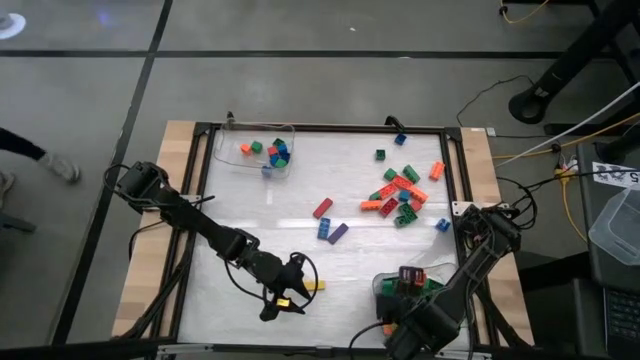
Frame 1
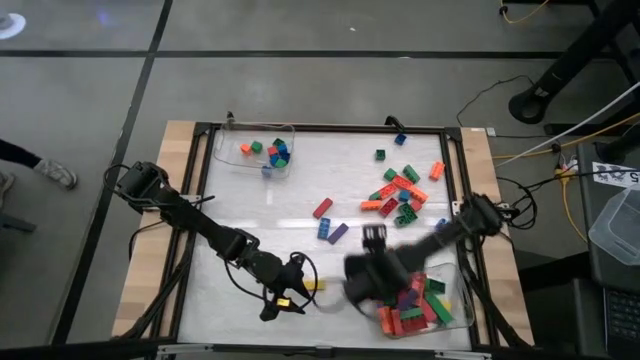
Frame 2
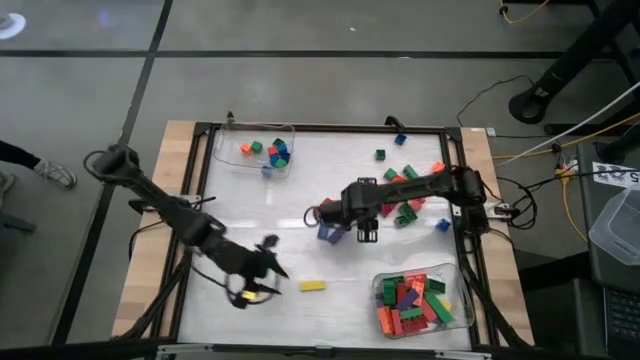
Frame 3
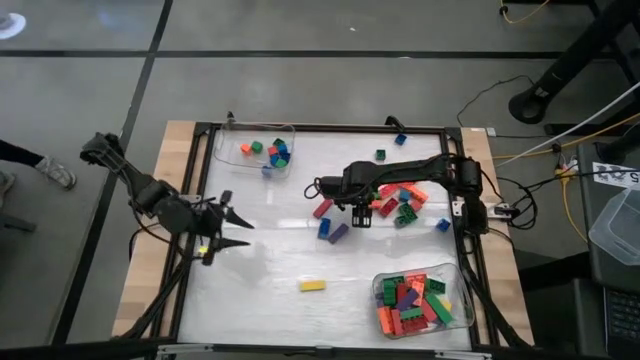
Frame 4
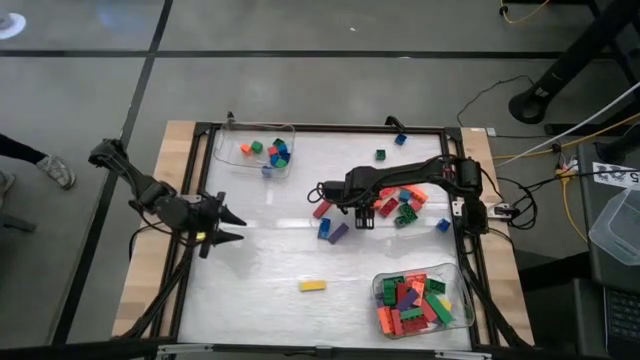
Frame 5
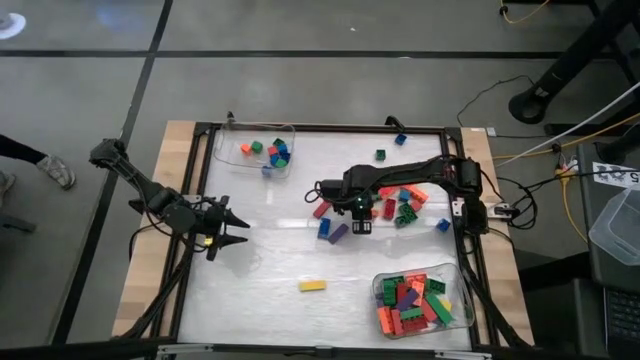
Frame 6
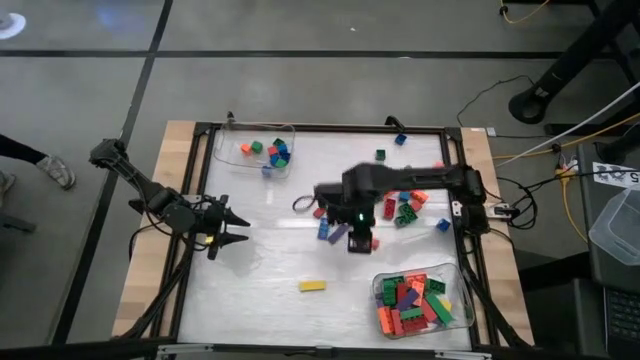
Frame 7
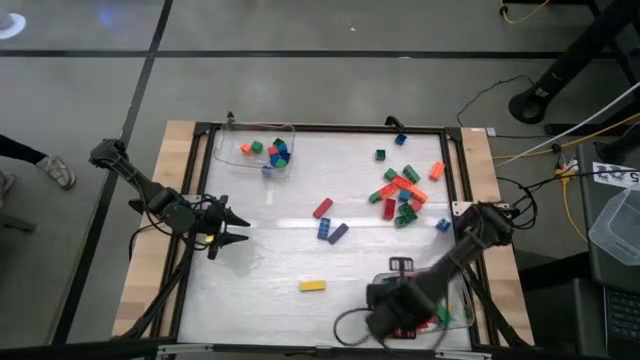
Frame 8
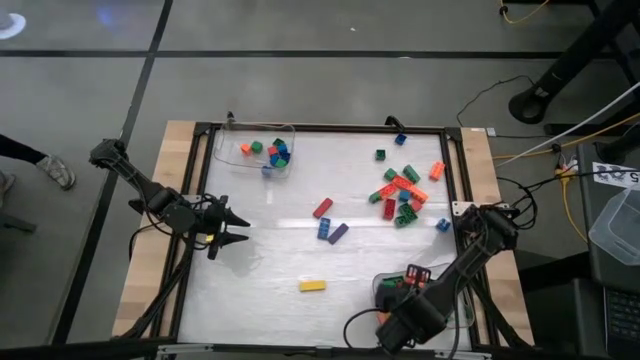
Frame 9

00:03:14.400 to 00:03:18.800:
Task: Sort blocks by size
Put the rectangular orange game piece into the bottom transparent bin

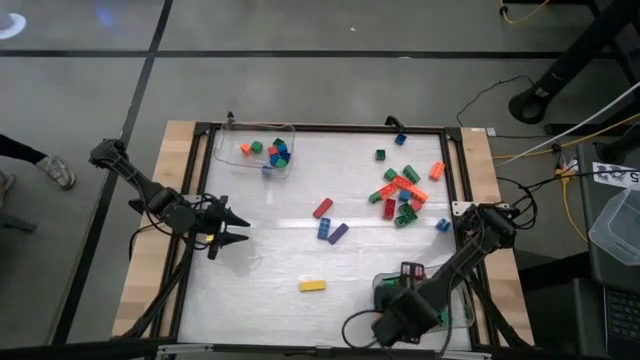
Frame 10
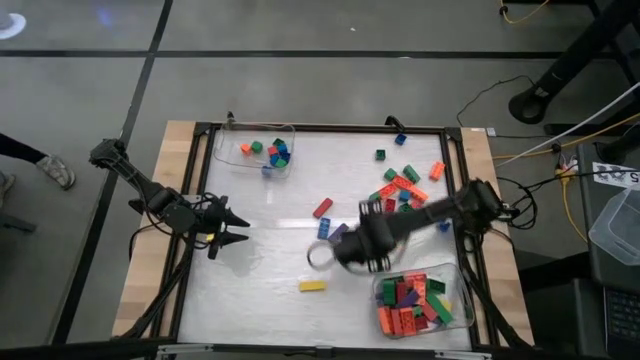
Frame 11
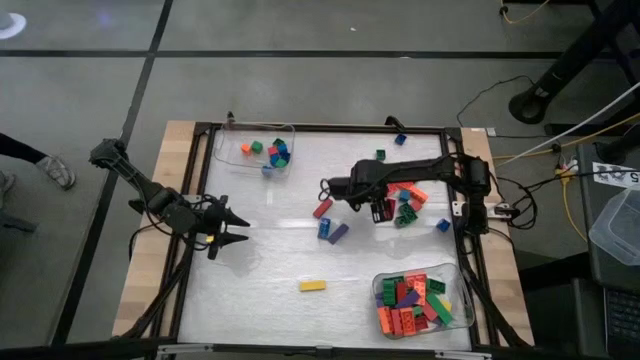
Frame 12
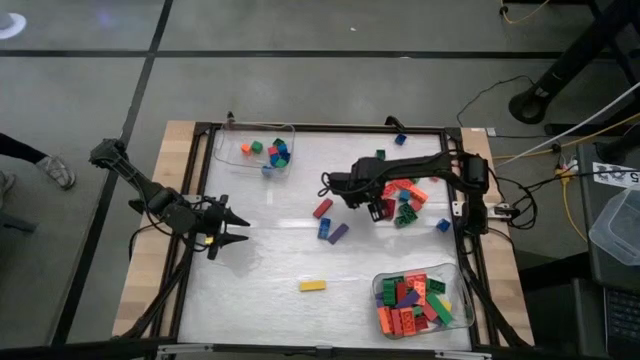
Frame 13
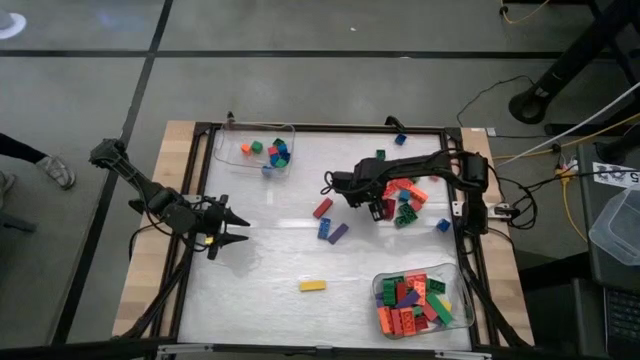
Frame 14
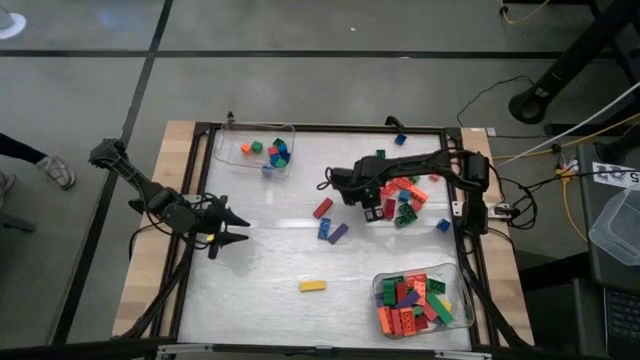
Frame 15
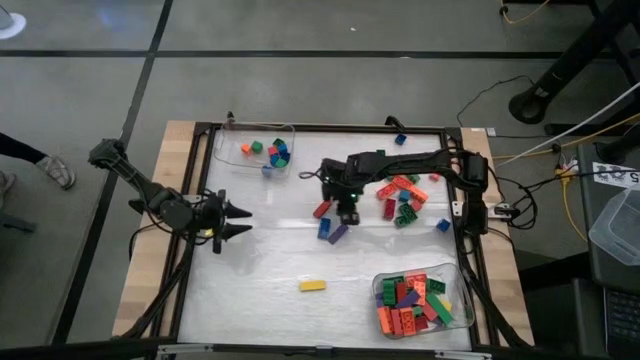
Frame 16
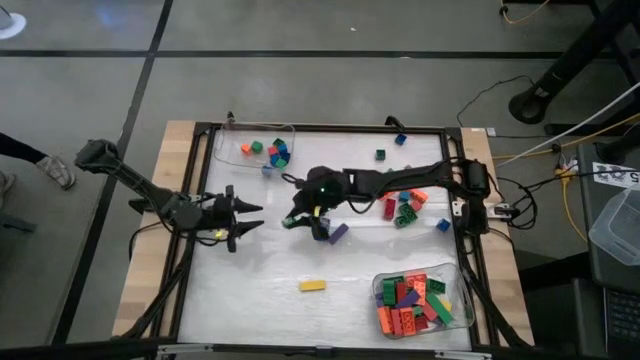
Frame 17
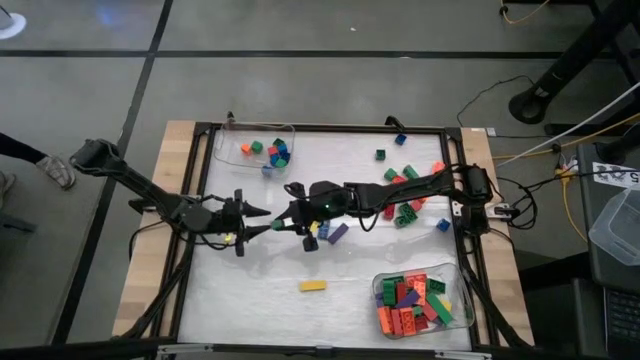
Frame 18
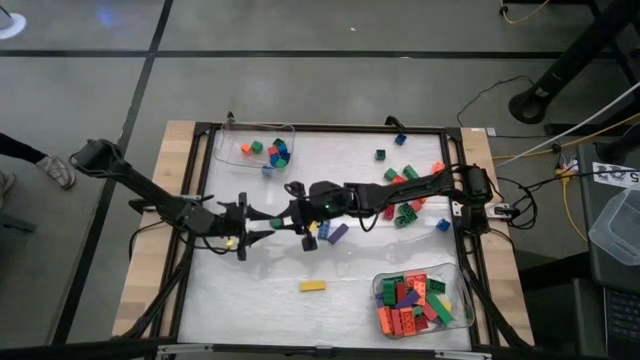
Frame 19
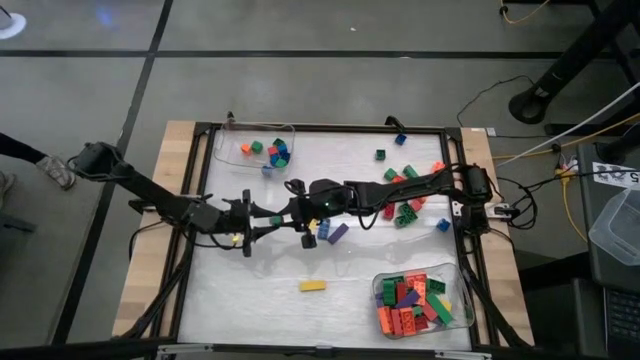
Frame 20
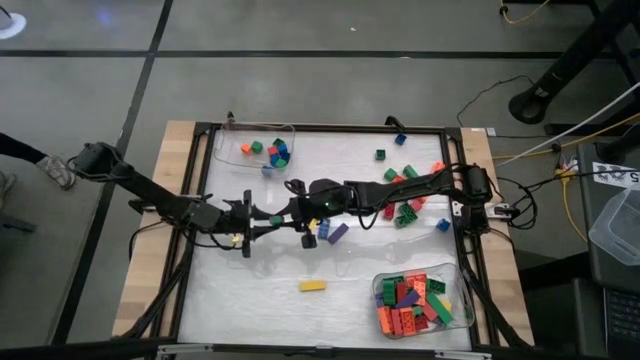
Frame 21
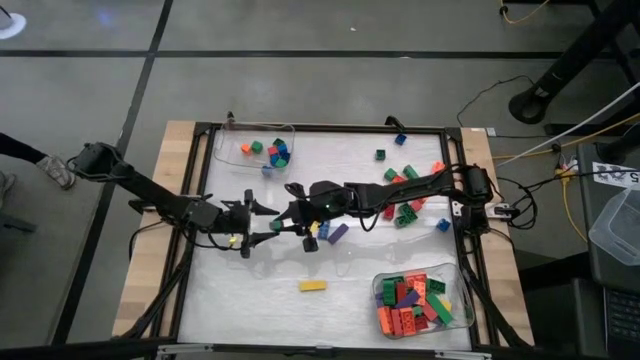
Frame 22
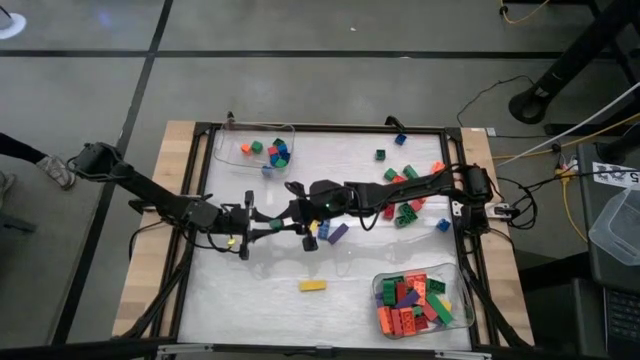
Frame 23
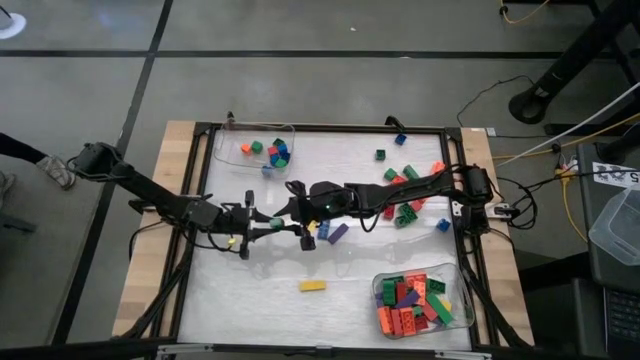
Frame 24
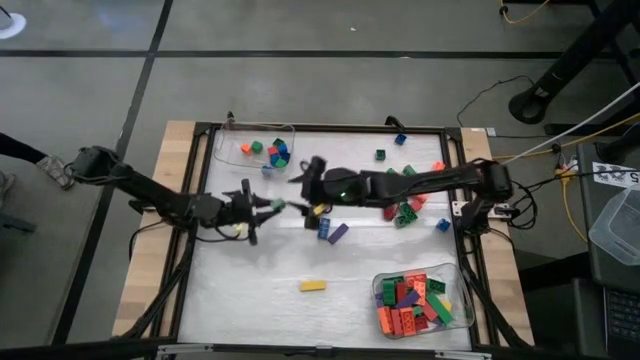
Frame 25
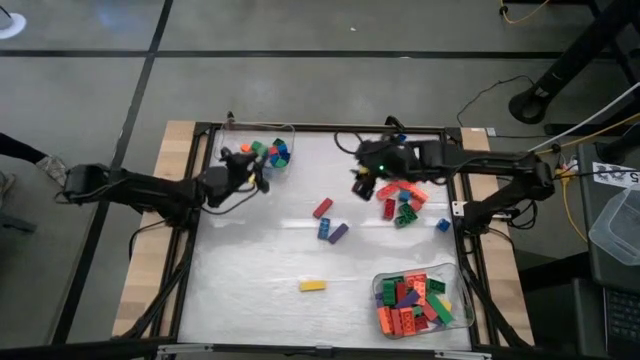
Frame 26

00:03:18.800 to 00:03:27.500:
Put the square green game piece into the top transparent bin

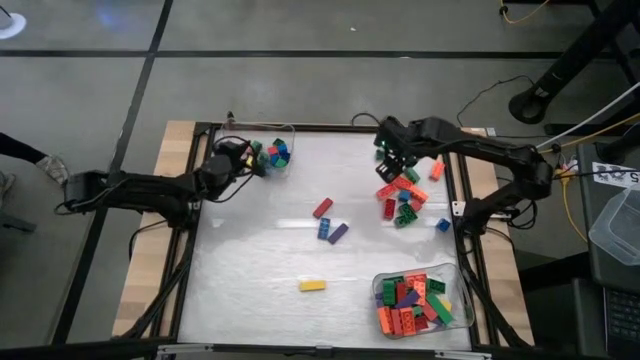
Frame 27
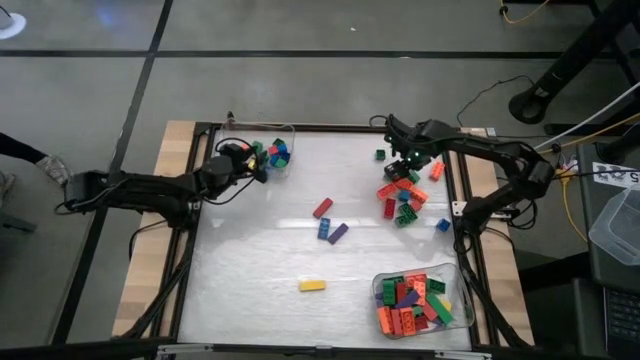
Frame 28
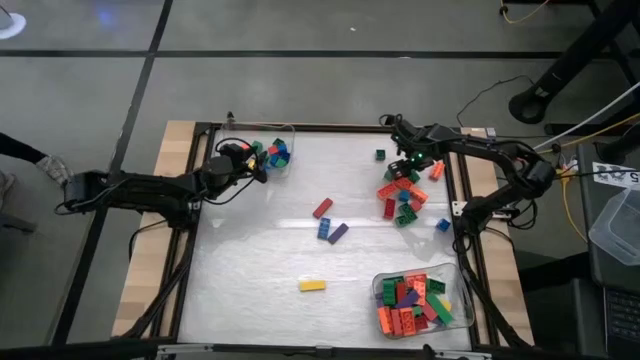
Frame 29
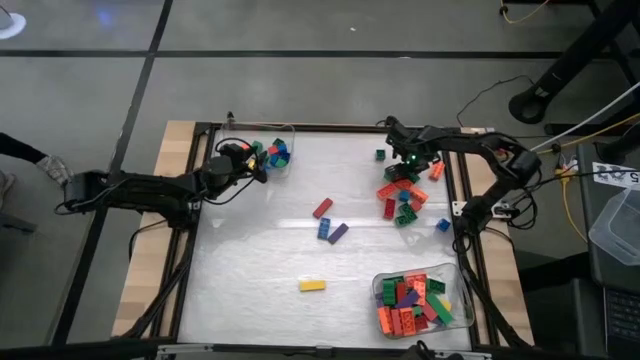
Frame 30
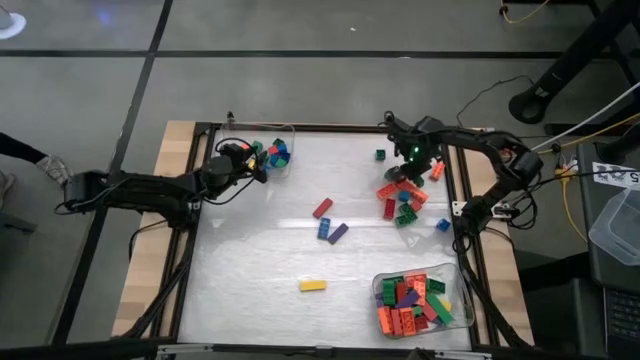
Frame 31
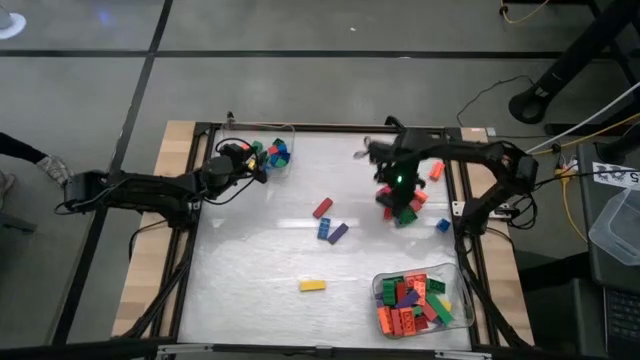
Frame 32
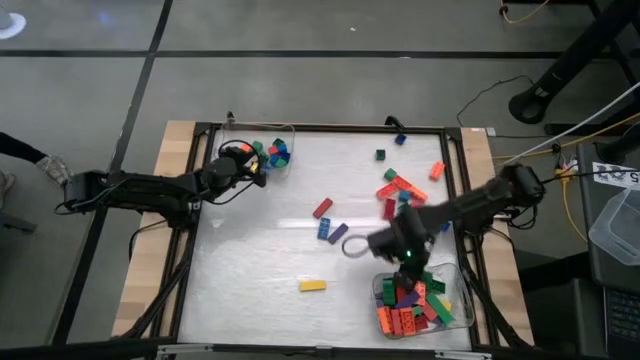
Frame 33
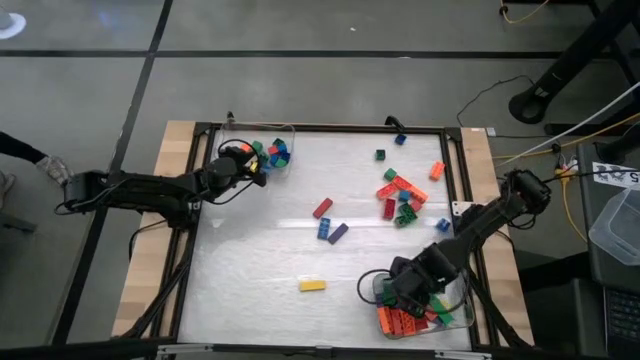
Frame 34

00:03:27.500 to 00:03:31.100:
Put the rectangular green game piece into the bottom transparent bin

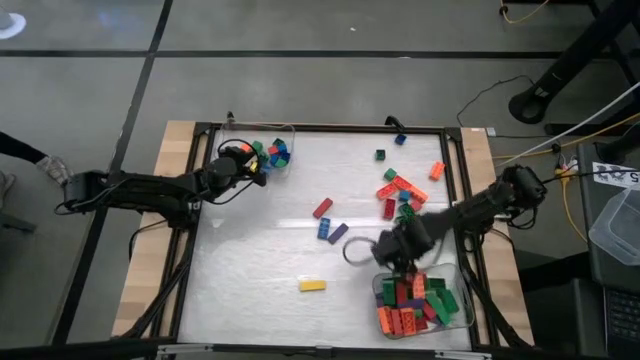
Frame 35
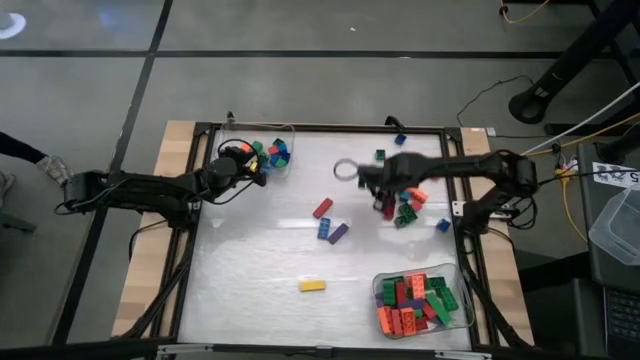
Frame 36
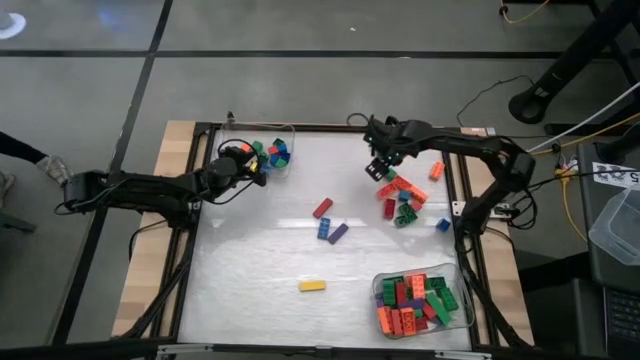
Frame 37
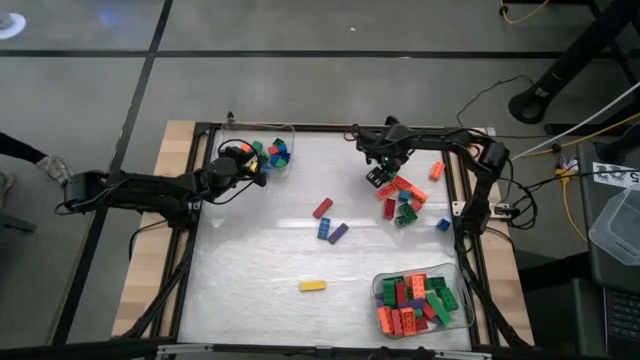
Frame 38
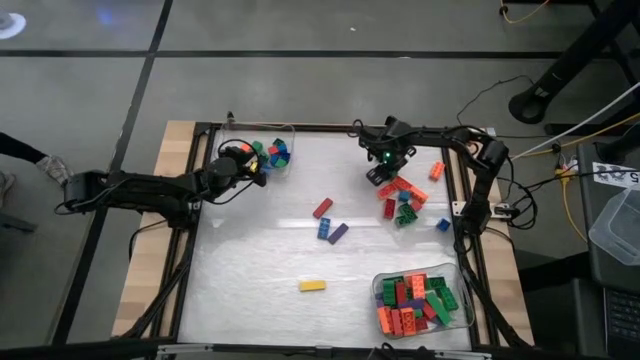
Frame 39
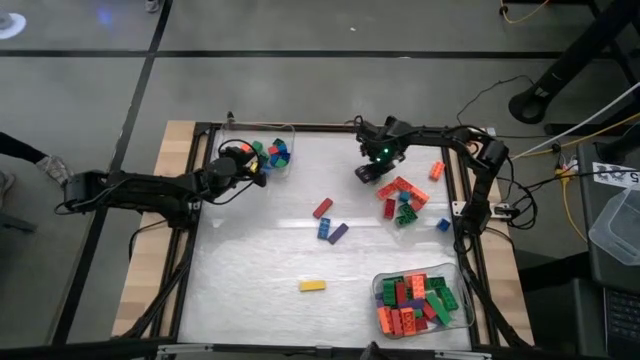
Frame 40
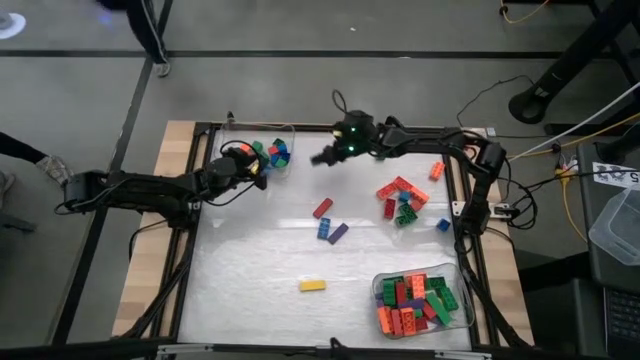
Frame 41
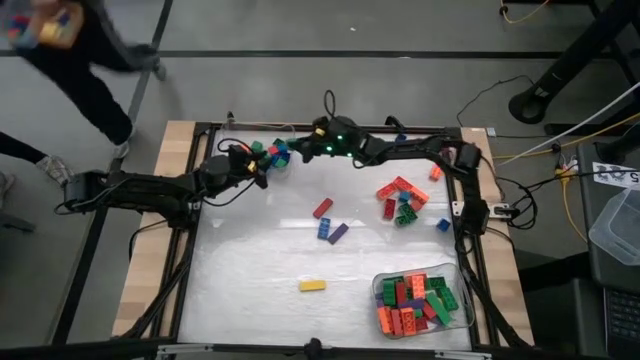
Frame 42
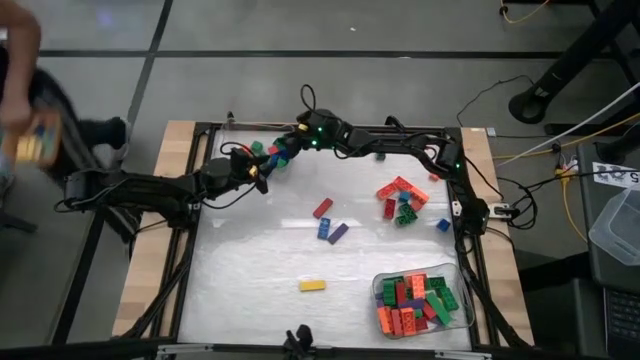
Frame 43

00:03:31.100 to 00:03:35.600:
Put the square green block into the top transparent bin
